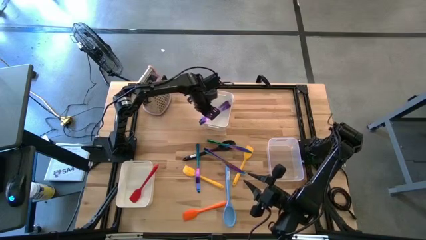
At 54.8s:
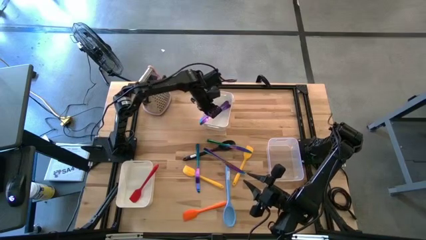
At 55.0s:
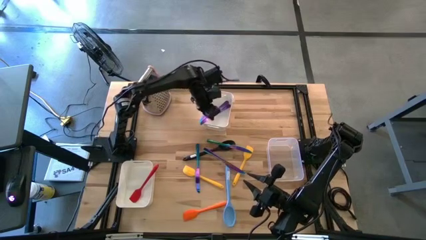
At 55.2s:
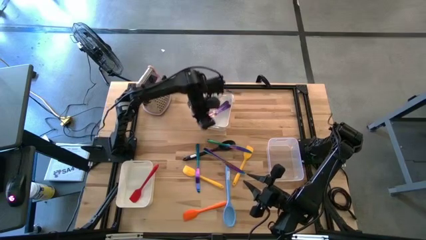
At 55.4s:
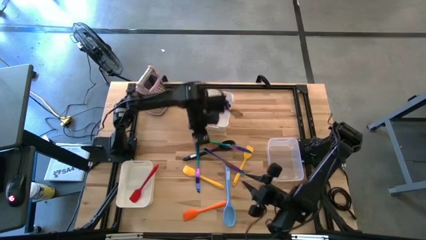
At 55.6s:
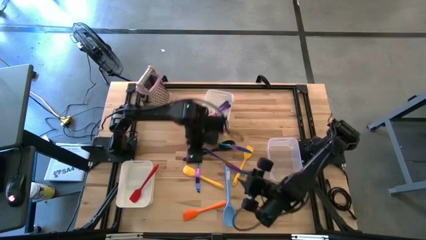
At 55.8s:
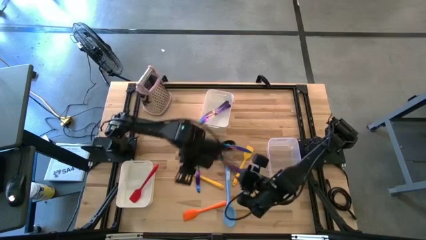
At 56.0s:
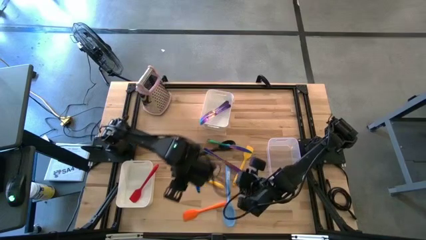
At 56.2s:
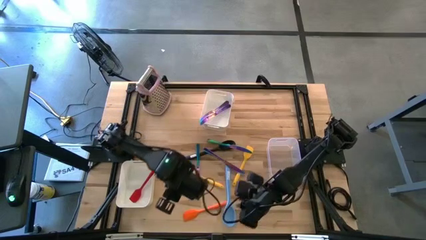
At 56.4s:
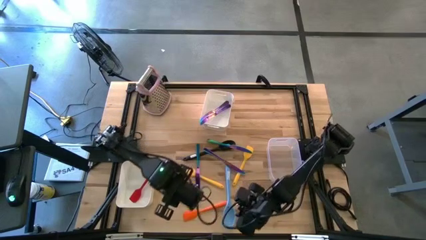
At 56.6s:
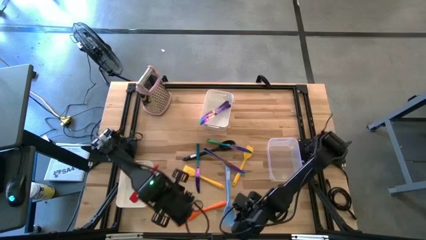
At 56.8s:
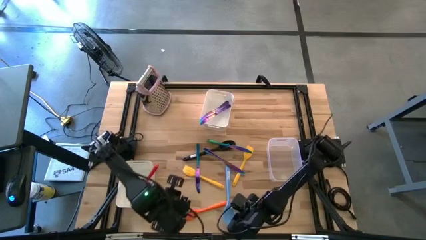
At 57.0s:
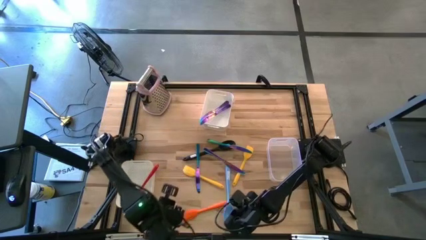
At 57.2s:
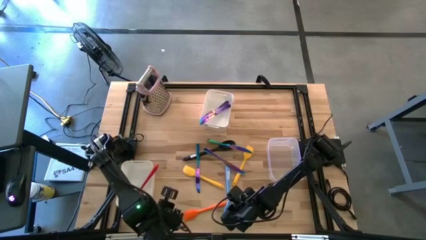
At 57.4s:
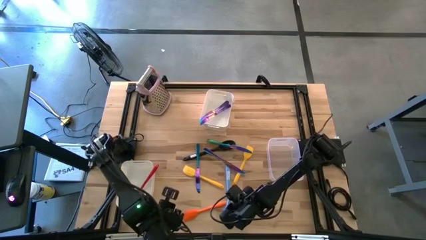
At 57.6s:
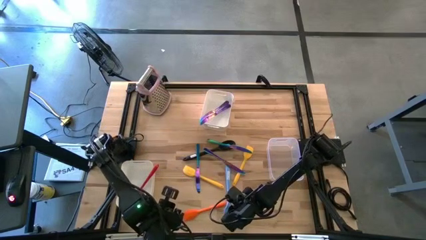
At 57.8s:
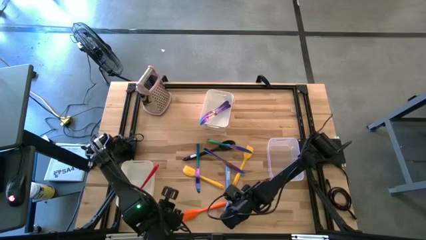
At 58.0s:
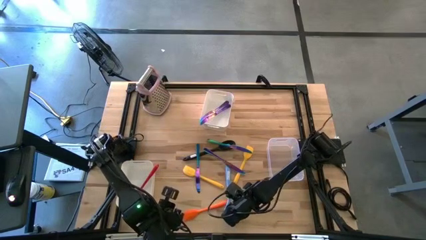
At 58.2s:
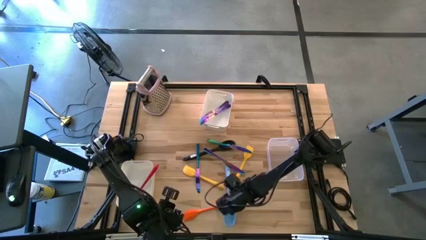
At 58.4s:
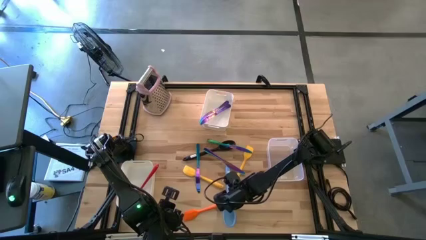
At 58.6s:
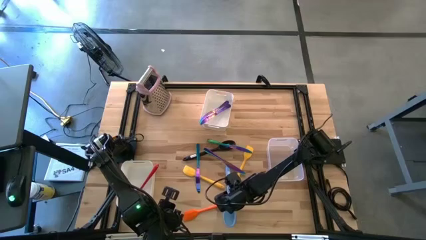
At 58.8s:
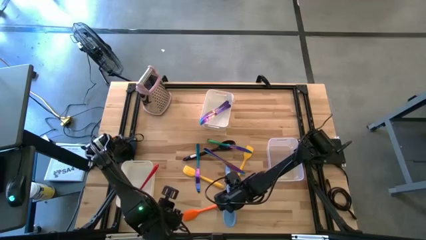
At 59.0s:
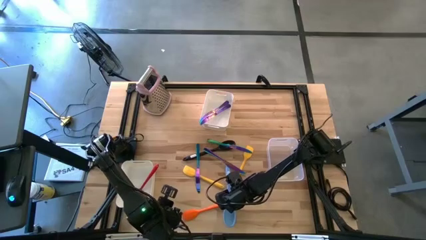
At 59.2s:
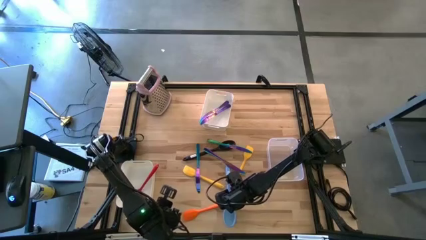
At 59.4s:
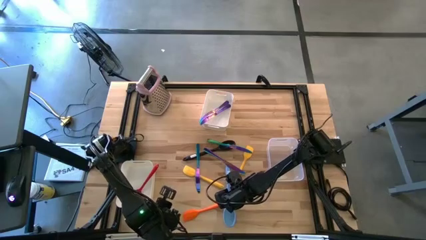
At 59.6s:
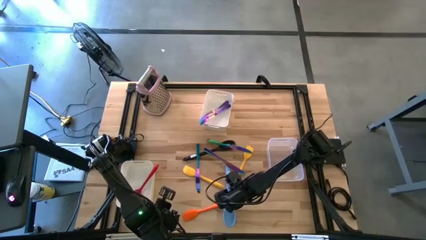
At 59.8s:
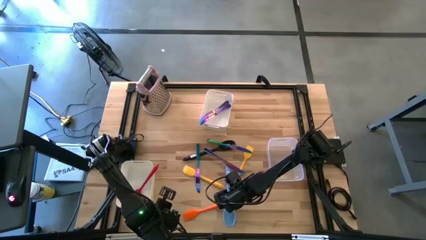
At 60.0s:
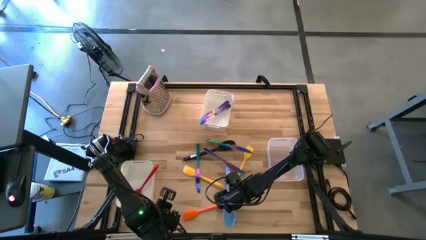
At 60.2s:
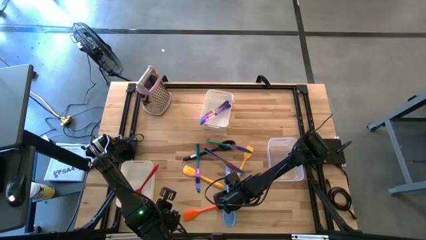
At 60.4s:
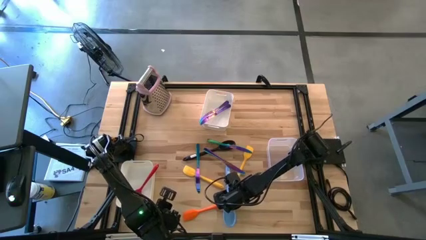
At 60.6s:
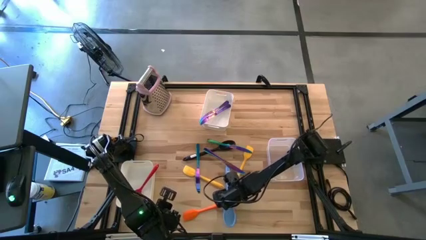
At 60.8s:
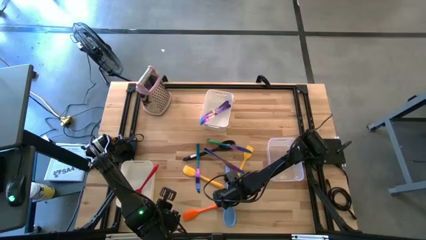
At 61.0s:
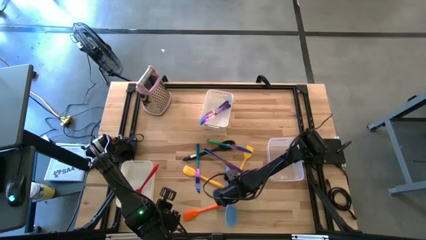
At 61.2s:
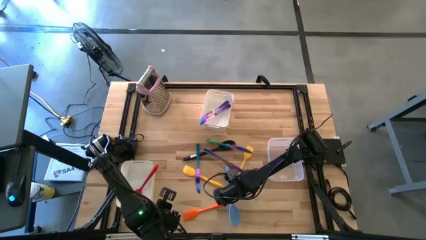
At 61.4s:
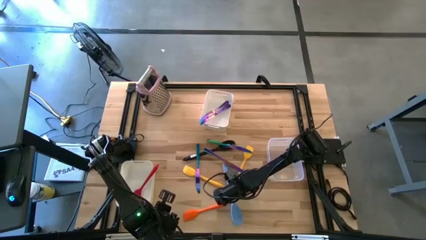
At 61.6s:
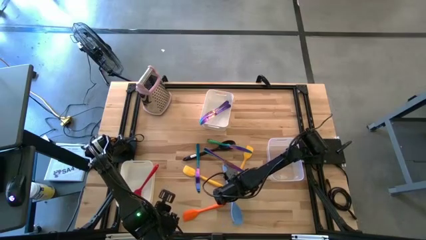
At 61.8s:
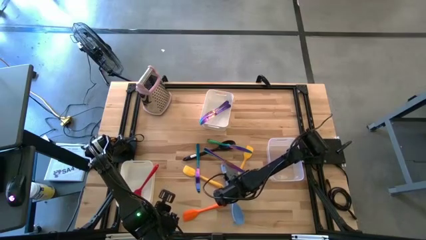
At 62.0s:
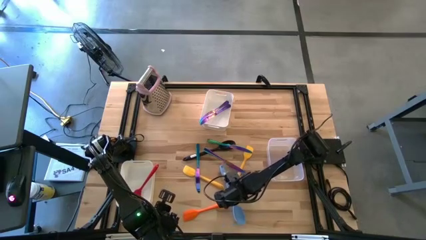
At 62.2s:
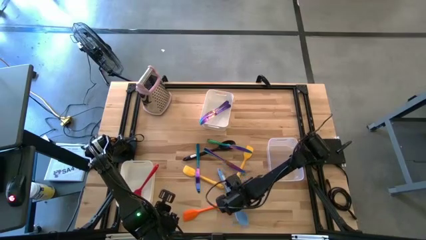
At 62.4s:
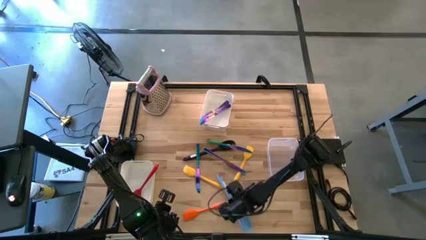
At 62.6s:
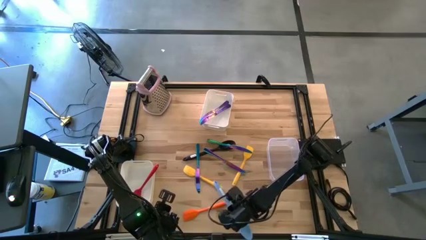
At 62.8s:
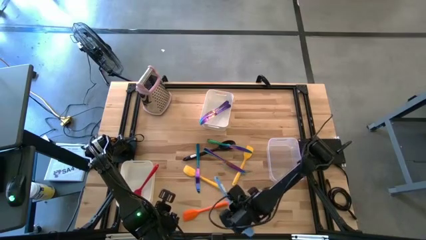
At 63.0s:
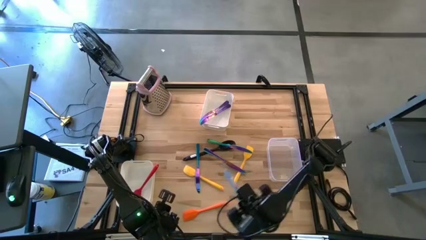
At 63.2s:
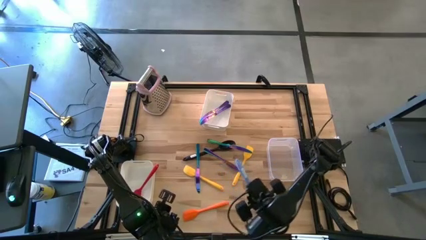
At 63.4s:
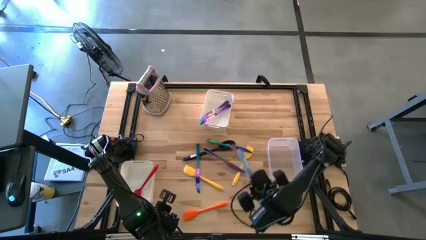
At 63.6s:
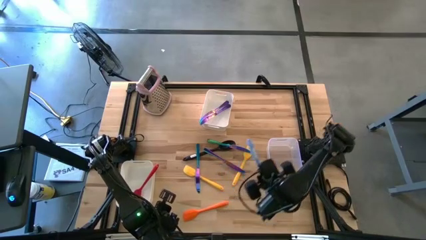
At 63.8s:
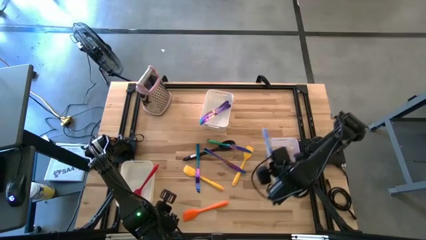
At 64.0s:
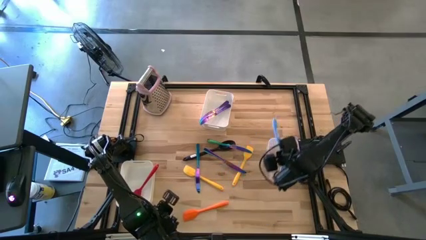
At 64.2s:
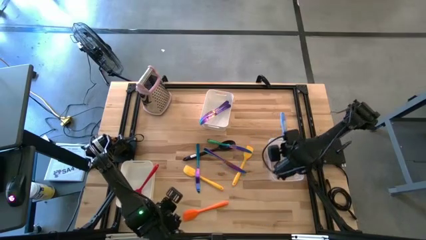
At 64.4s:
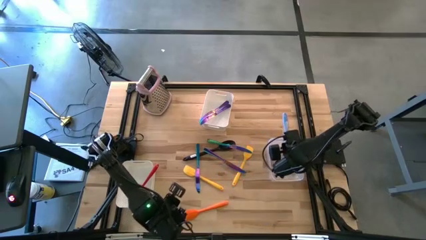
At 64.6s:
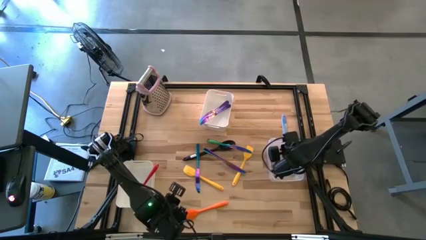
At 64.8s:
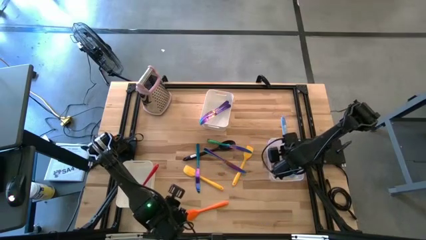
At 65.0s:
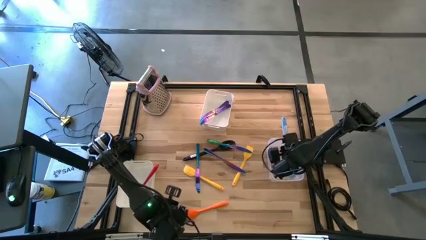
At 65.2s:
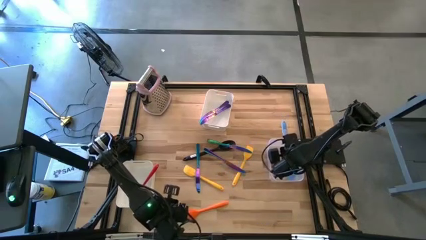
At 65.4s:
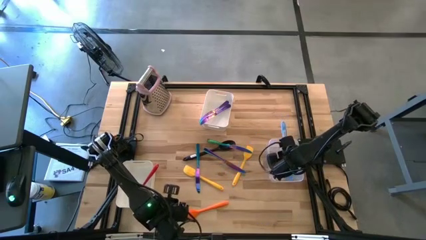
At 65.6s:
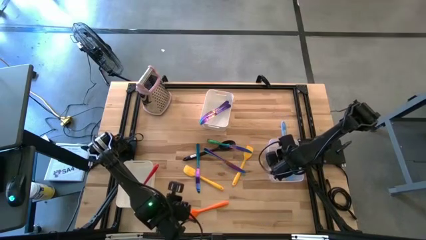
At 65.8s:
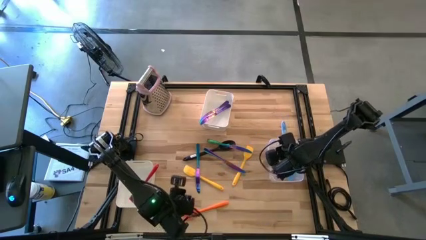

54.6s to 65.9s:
Task: Pick & Place Kitchen Items
Put the blue serving spoon into the transparent bin

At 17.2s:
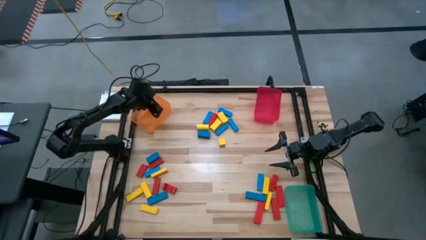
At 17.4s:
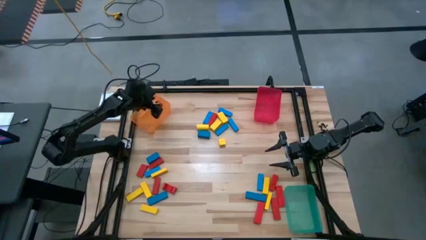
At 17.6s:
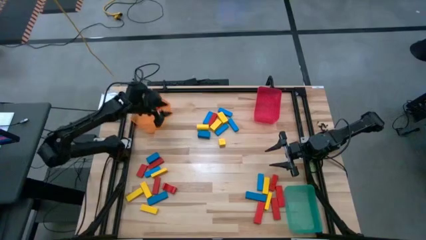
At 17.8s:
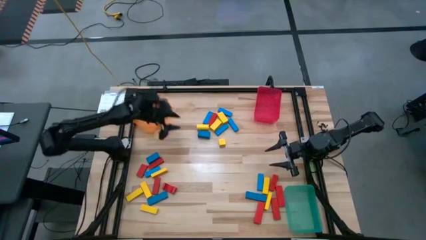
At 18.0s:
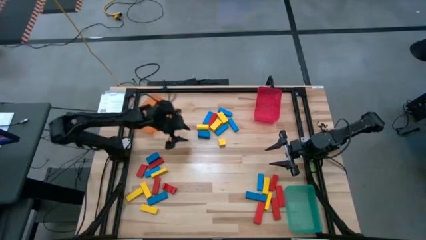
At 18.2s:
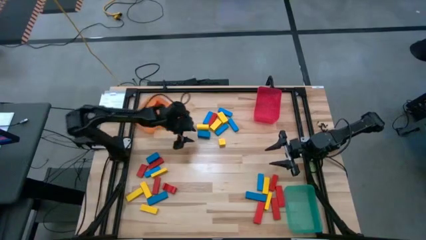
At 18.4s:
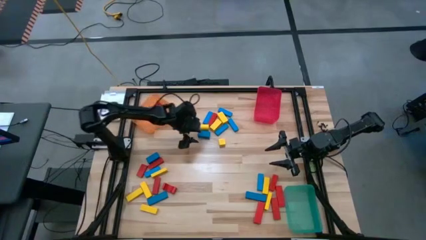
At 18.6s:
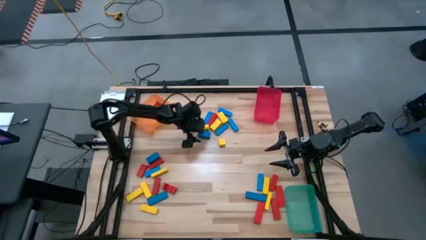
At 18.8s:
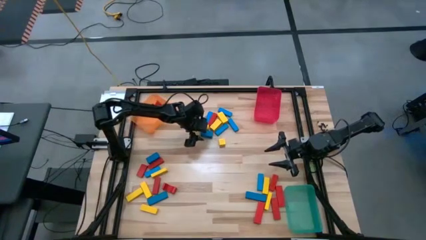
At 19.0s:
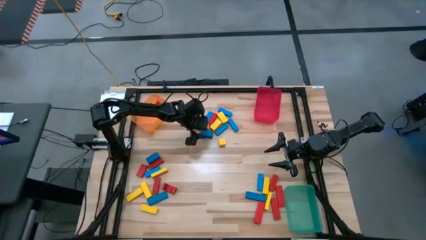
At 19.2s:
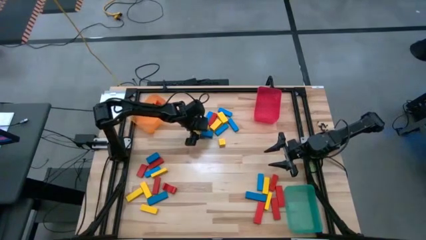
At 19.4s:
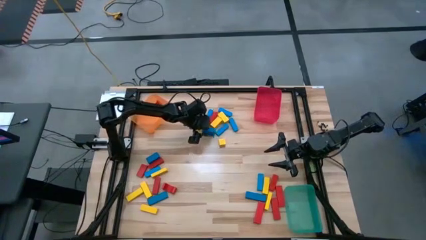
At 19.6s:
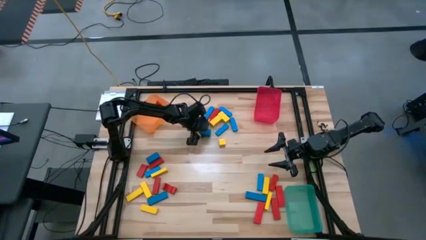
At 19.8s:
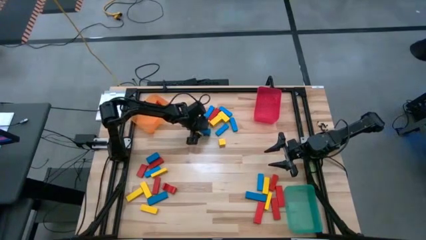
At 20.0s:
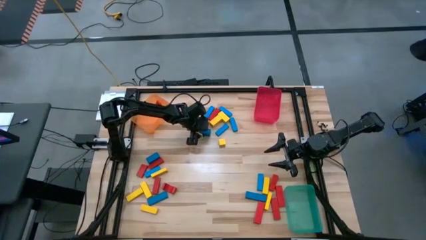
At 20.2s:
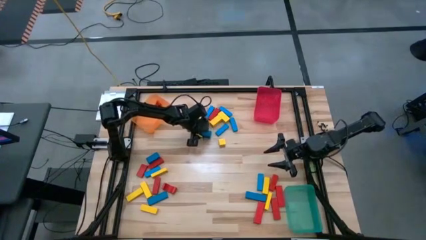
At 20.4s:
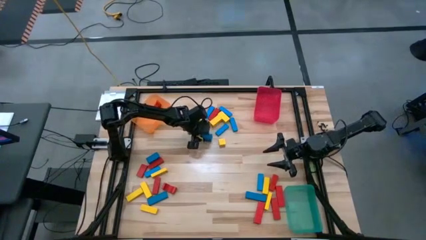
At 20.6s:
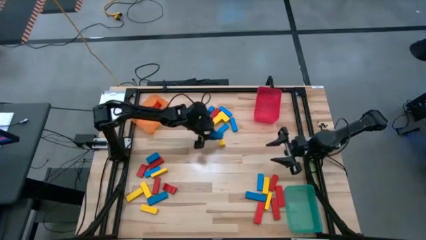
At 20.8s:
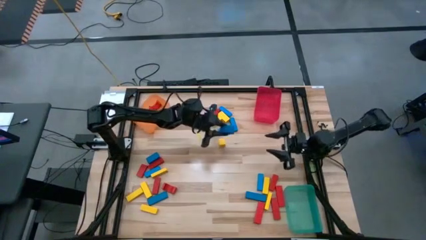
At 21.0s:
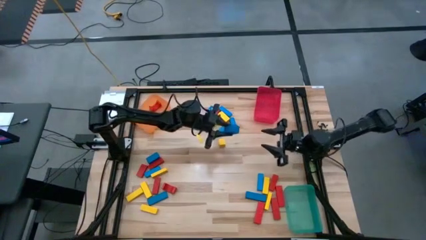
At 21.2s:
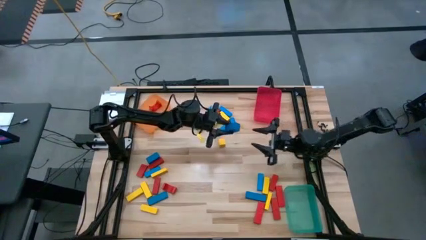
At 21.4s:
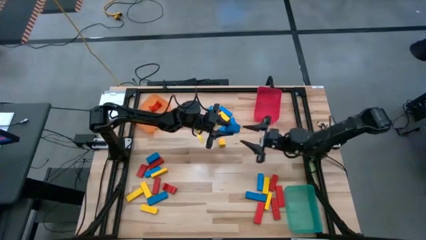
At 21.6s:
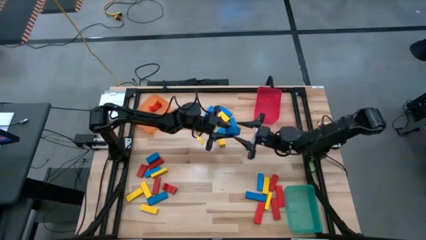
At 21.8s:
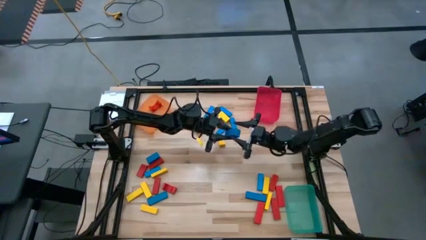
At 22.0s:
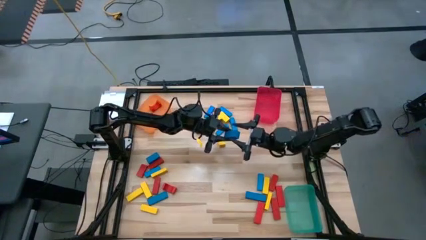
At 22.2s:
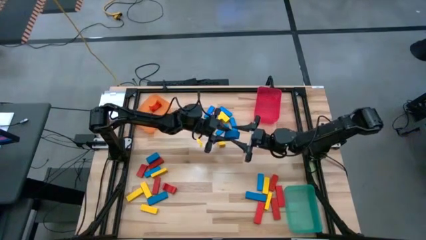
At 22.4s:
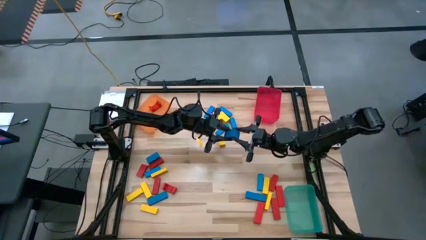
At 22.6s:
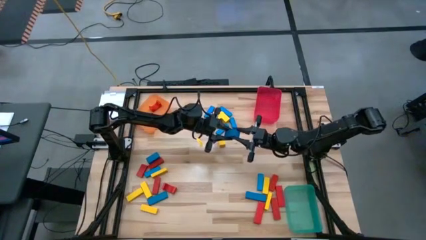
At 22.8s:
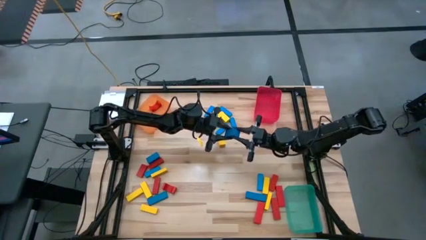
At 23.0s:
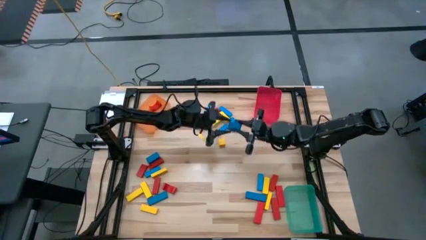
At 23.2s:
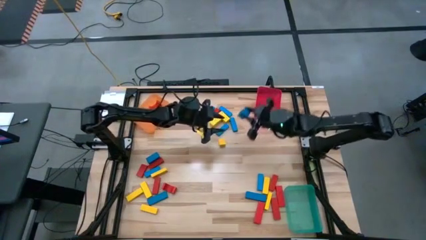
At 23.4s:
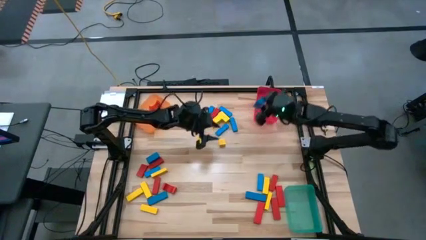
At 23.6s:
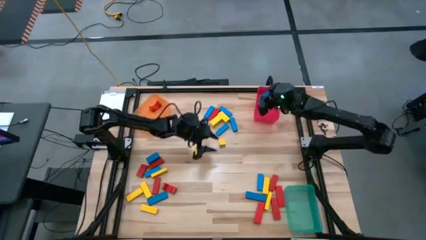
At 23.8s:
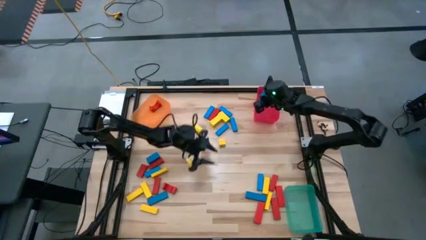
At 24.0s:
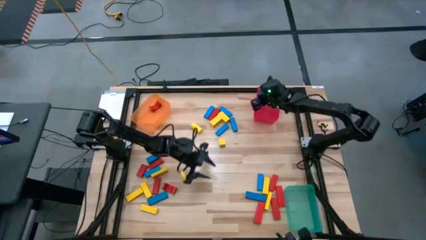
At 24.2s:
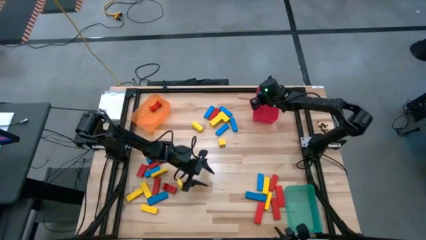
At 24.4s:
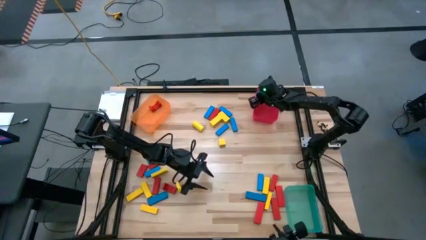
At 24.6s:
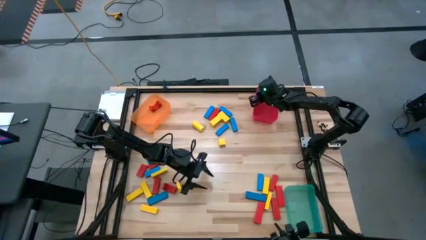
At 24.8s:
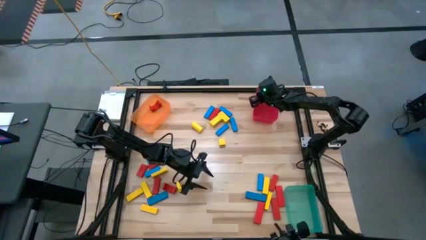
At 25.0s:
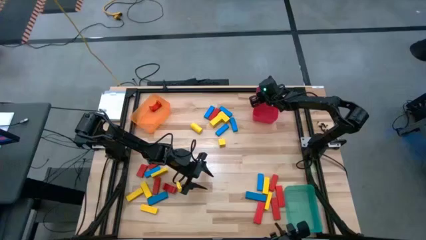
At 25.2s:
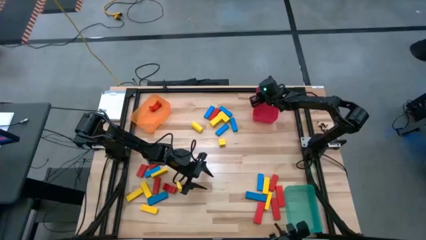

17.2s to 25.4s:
Task: Sort blocks
Put the blue block into the red bin
